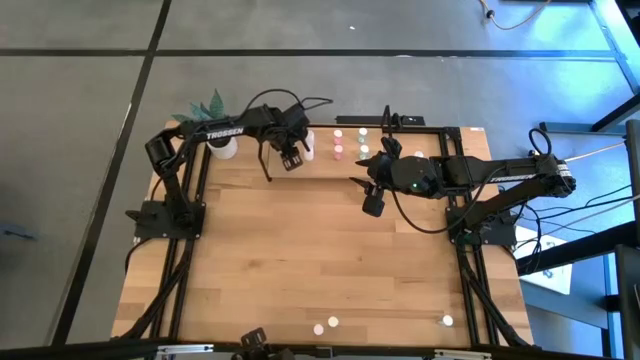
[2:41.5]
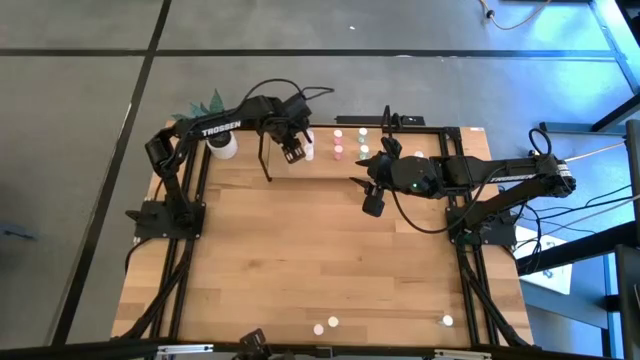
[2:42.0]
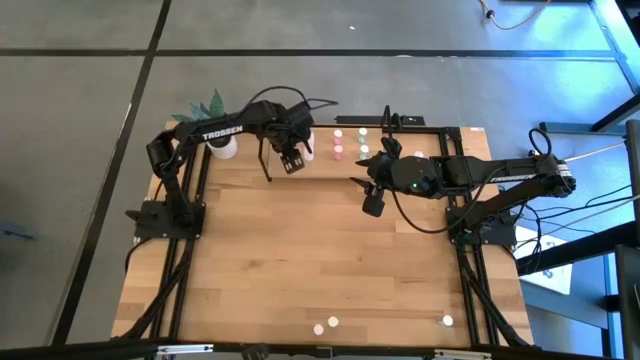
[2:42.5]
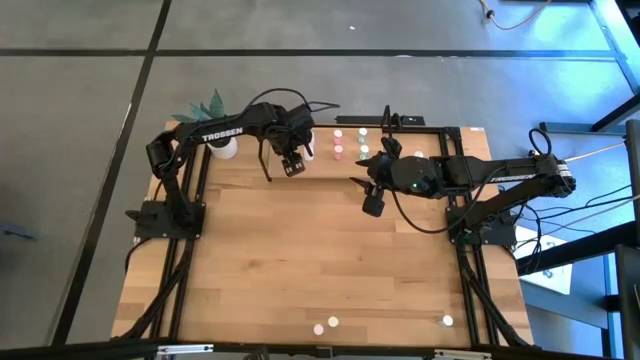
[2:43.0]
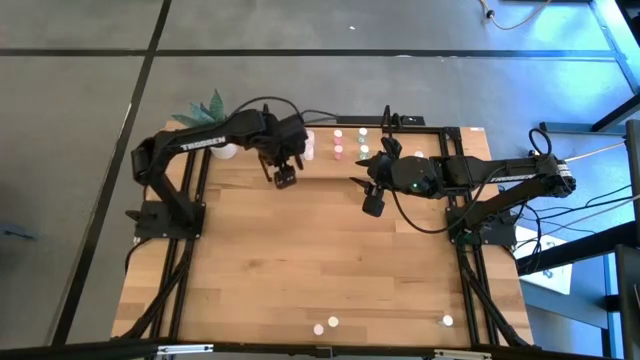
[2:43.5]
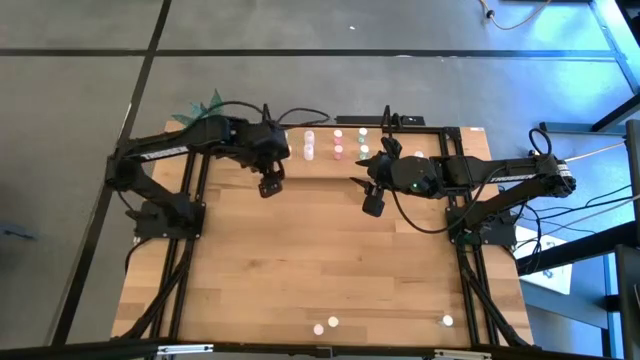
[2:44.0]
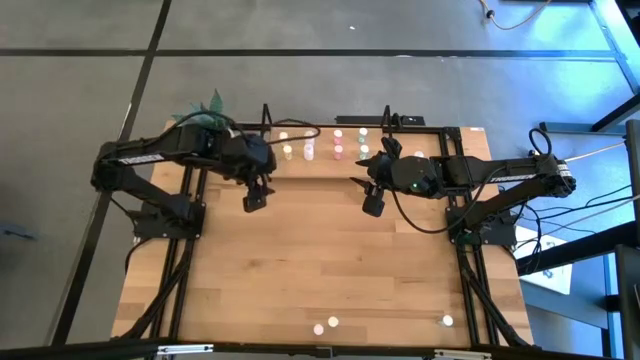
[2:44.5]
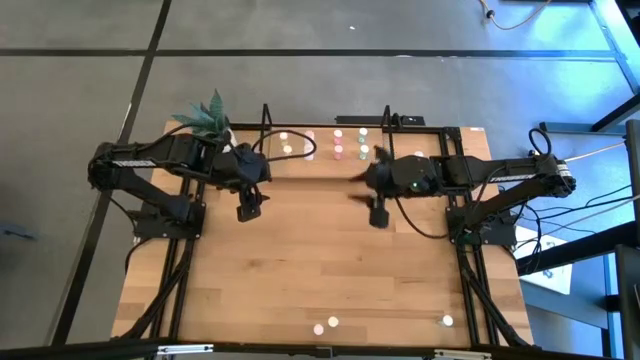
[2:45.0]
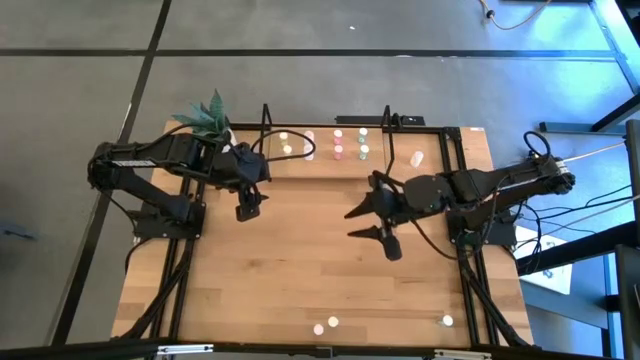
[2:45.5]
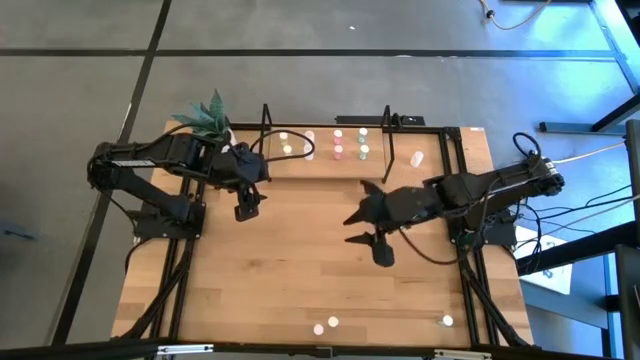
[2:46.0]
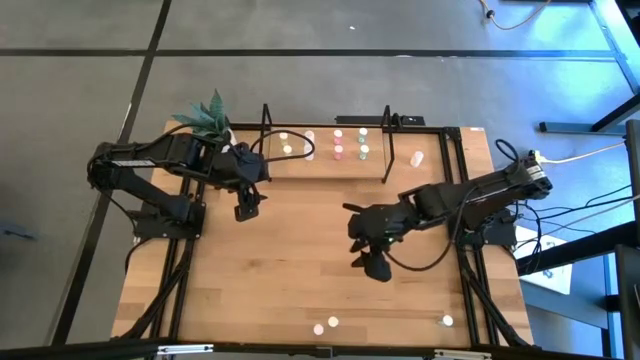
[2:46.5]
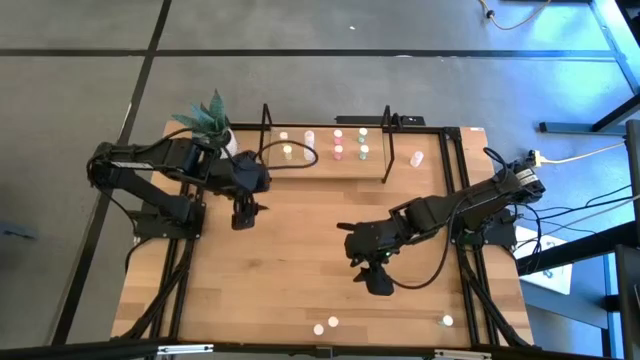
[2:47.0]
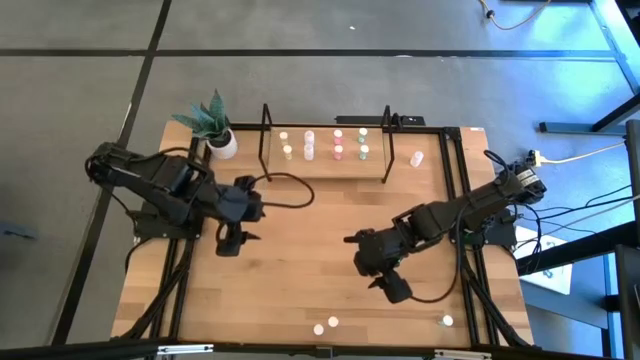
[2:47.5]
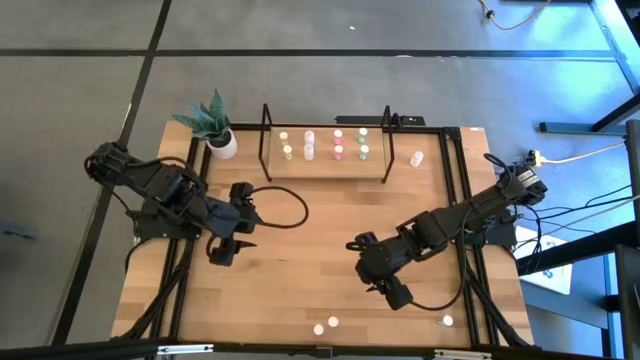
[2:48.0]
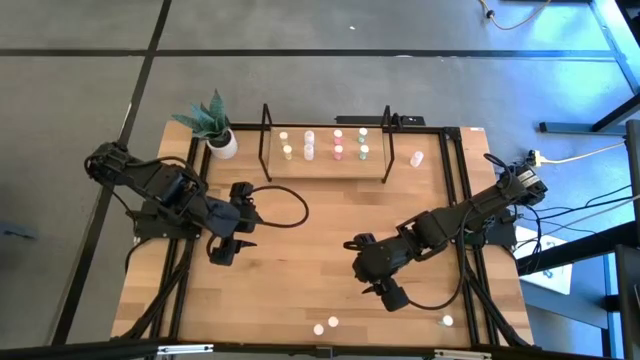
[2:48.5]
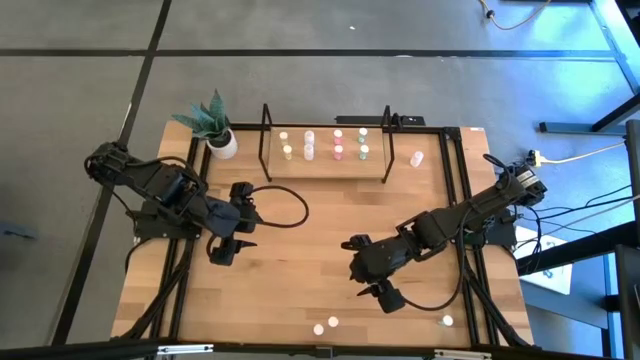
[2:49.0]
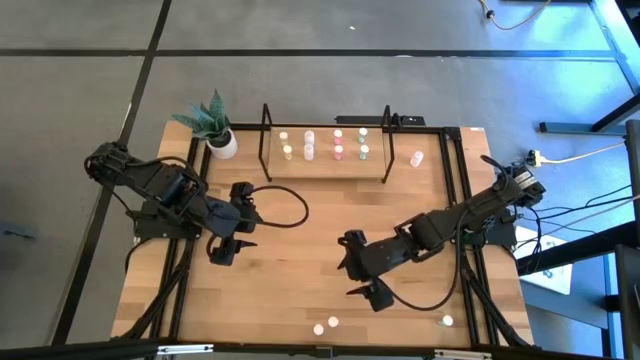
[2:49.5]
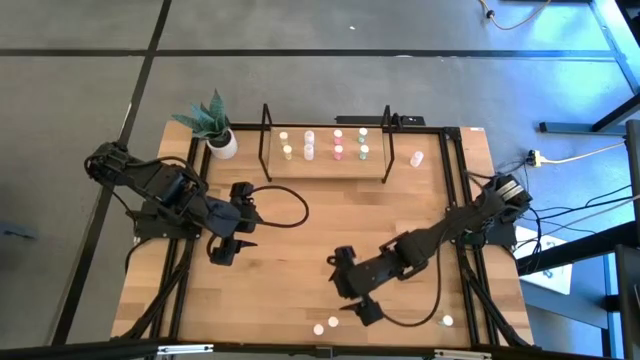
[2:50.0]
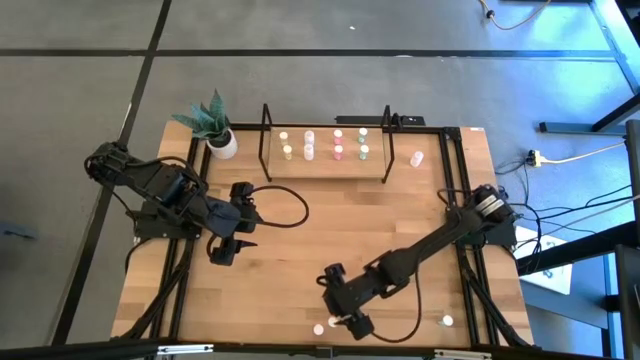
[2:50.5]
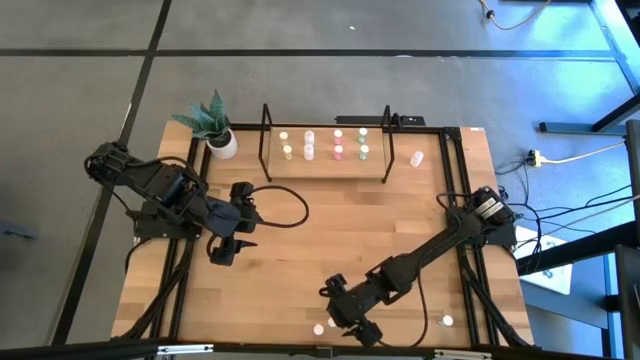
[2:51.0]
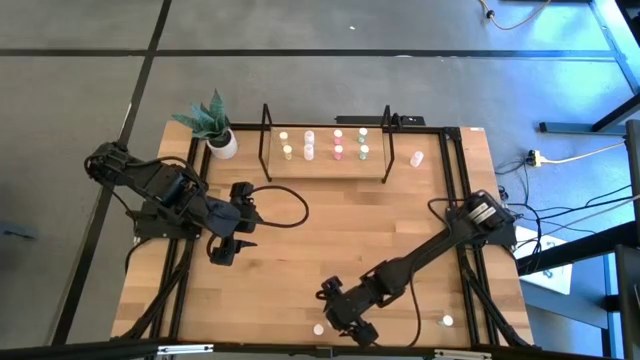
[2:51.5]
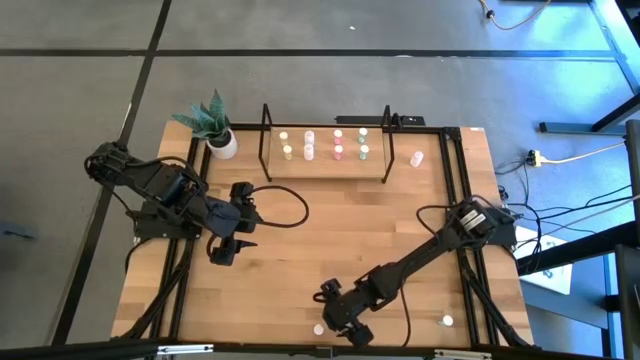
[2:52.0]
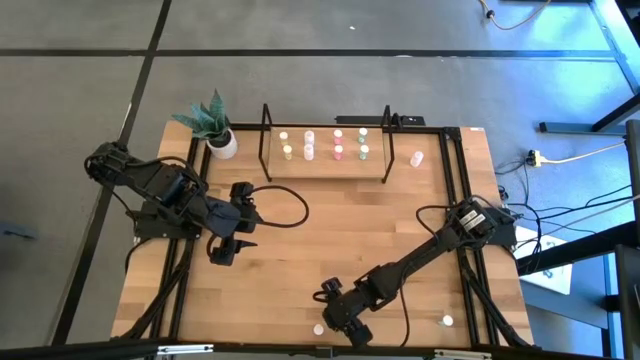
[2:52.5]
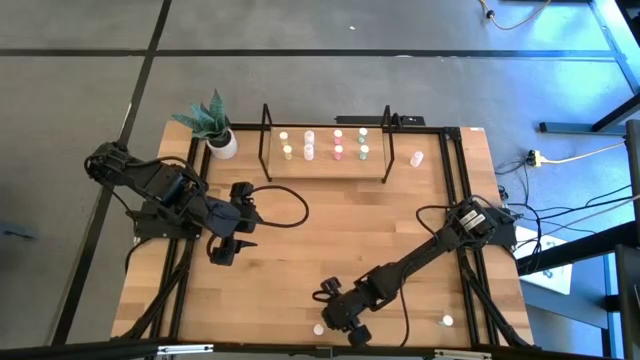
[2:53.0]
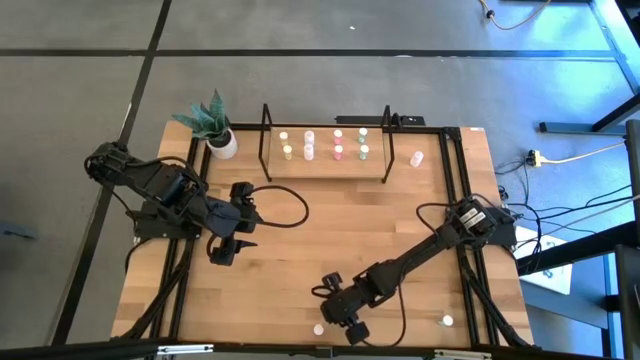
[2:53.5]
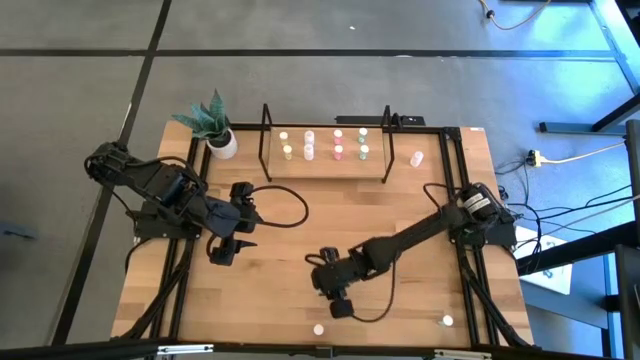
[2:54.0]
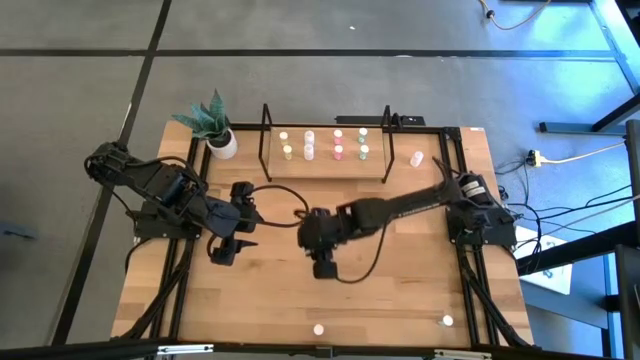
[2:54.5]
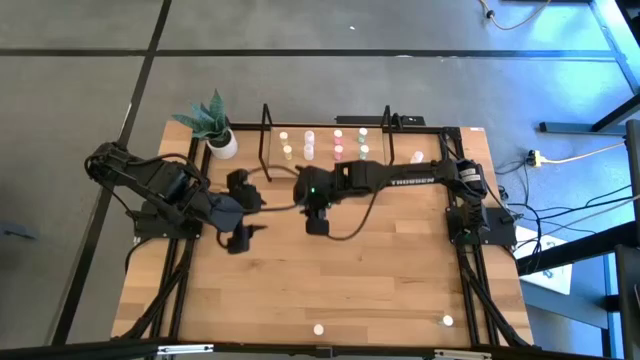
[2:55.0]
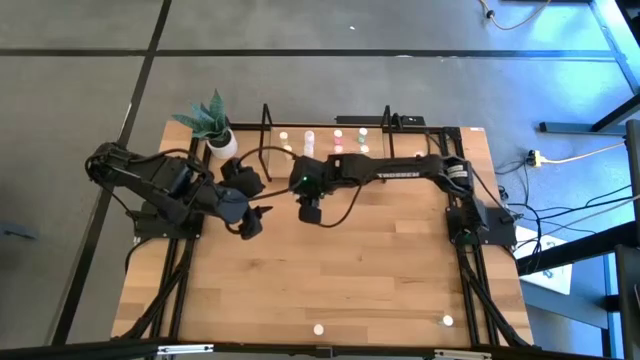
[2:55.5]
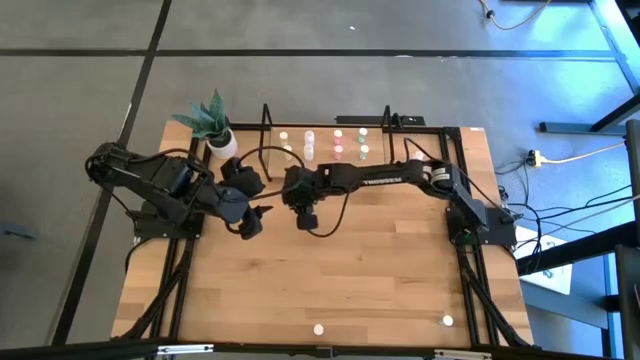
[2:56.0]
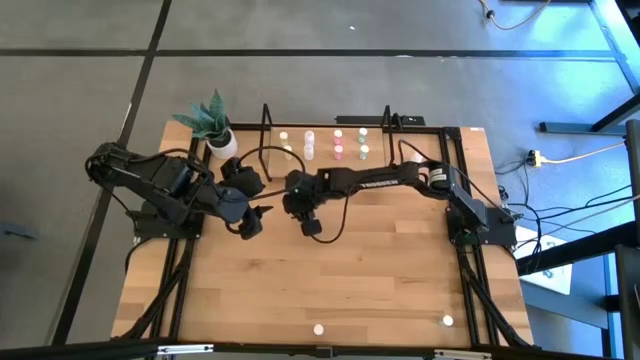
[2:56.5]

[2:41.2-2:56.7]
Task: Pick and place medicine bottles onto shelf by color
Put the yellow pill bottle on the shelf aligned with the other yellow pill bottles

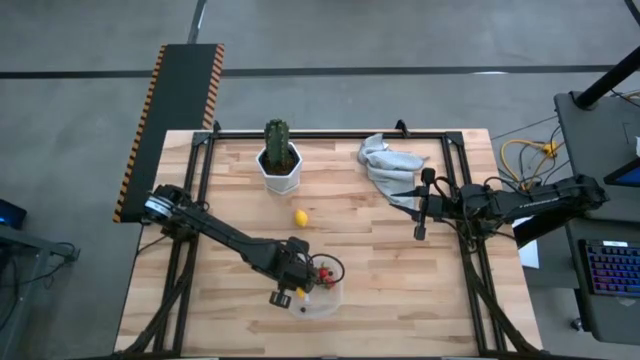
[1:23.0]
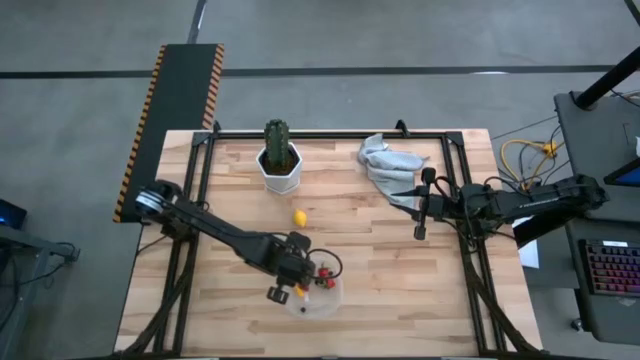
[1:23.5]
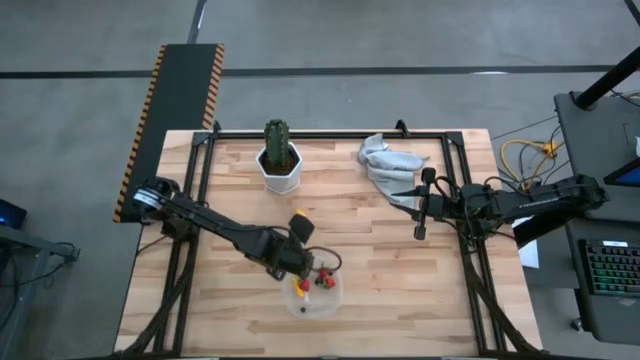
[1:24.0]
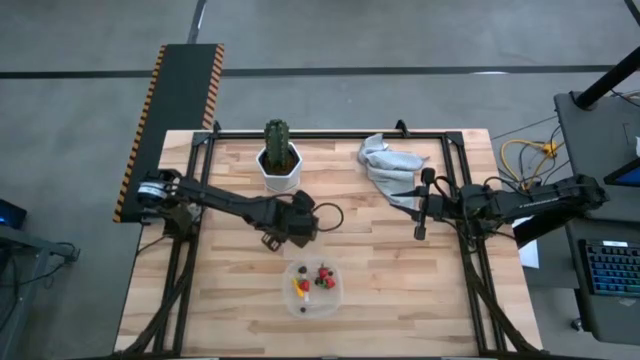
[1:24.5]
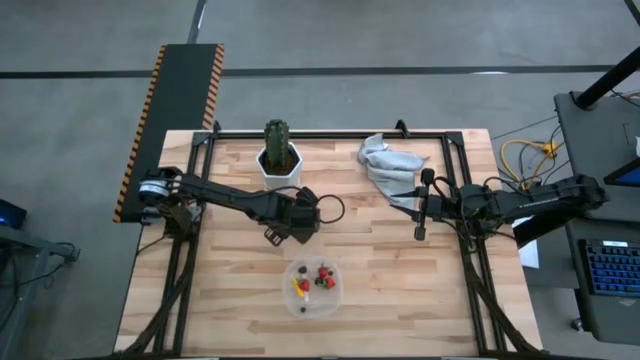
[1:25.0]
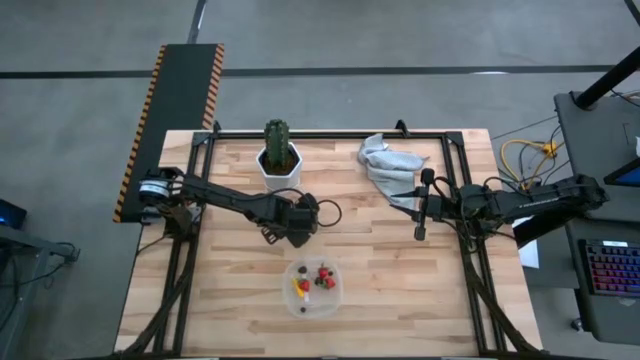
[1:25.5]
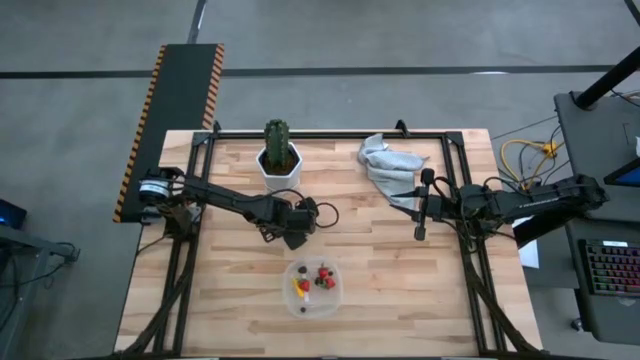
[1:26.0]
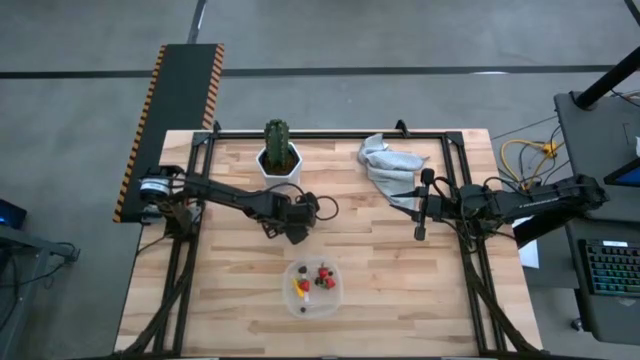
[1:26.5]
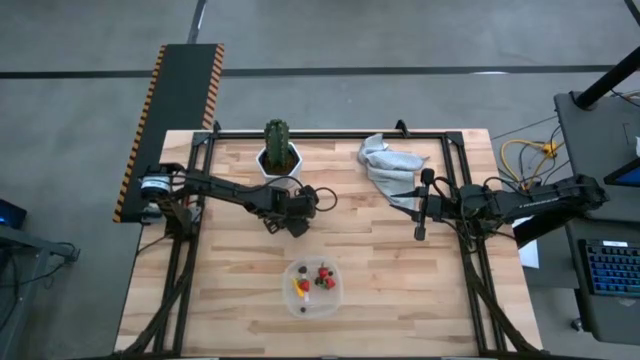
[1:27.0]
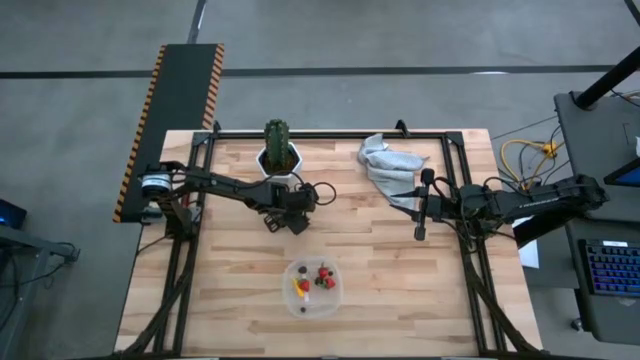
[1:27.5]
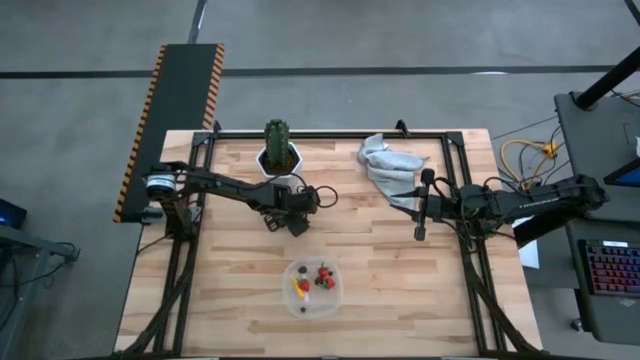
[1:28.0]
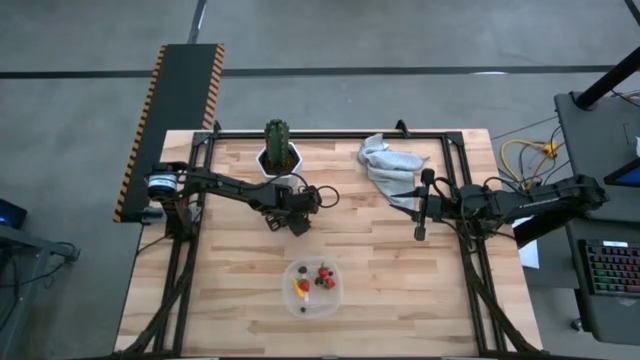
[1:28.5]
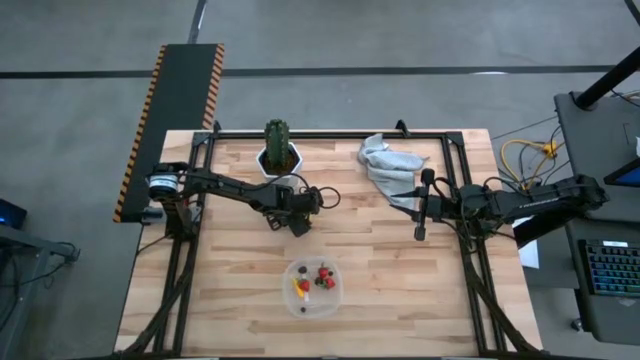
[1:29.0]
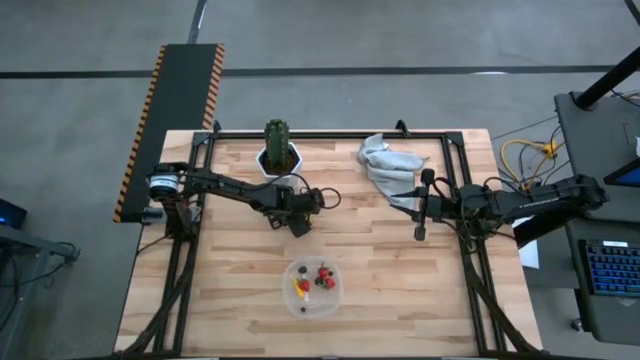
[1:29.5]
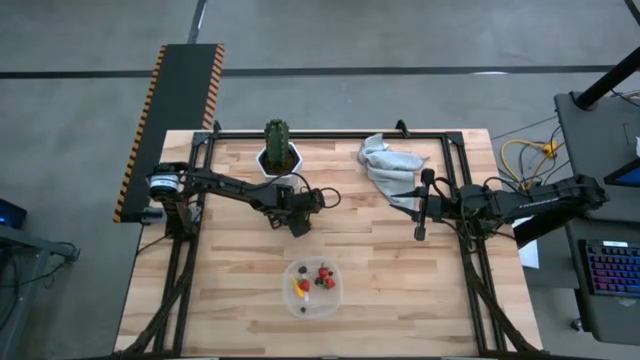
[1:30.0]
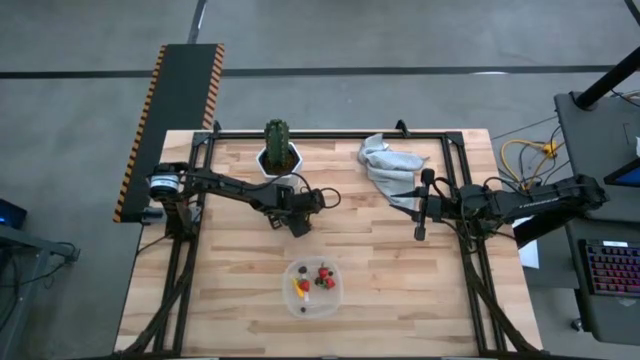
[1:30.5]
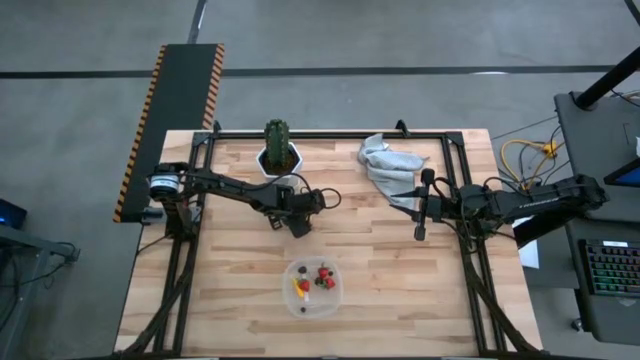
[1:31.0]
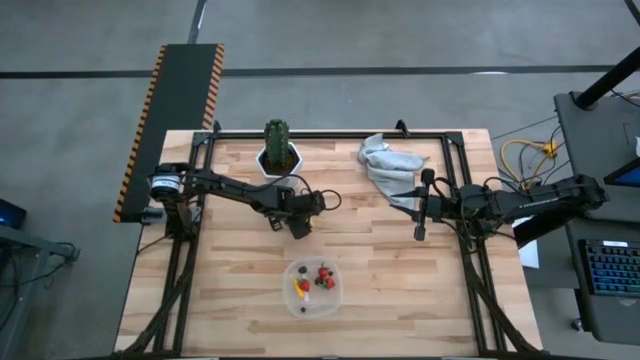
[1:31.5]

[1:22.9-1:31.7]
Task: Pick and placing Produce into tupperware
Put the yellow lemon into the transparent container
